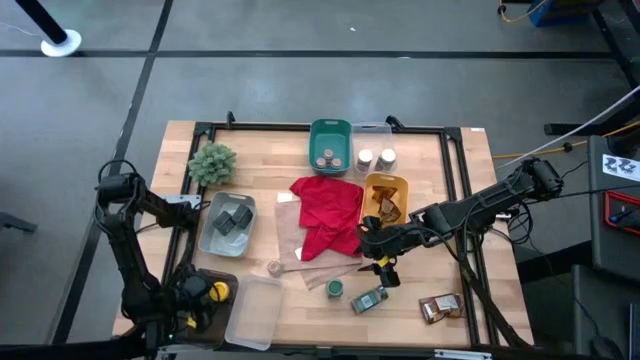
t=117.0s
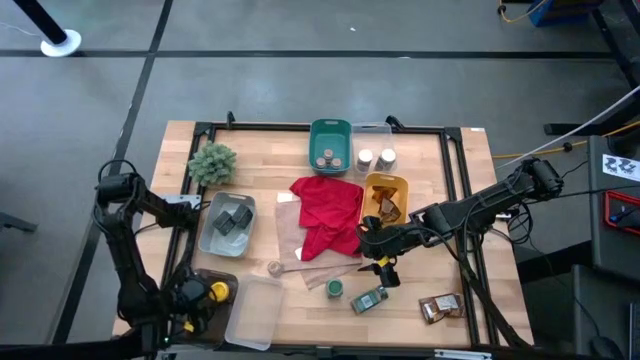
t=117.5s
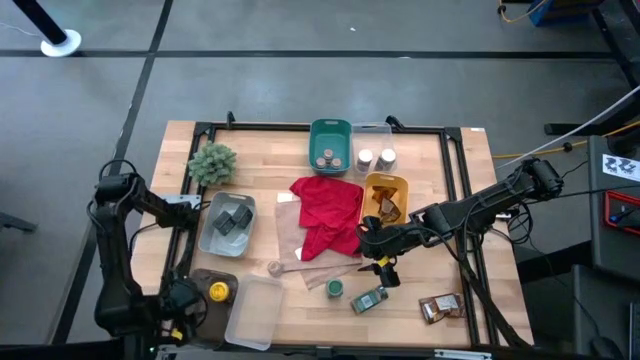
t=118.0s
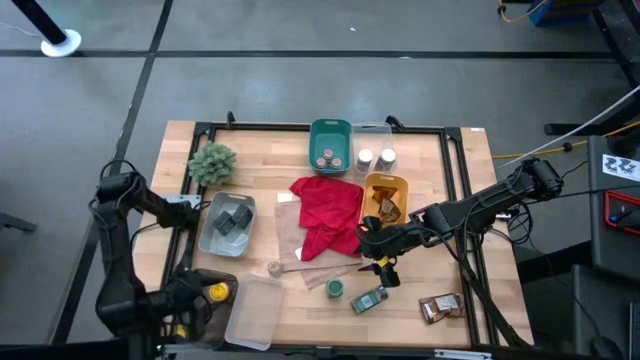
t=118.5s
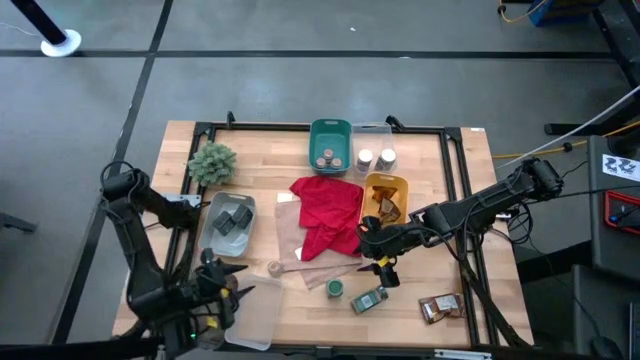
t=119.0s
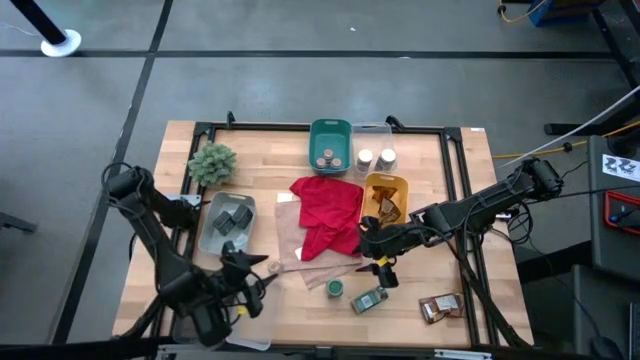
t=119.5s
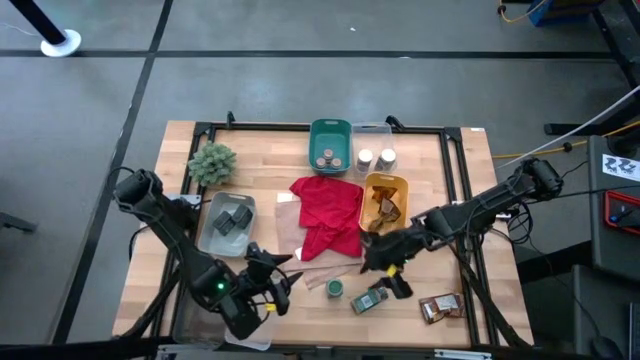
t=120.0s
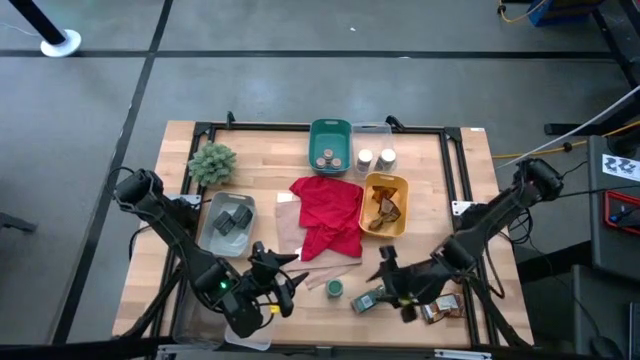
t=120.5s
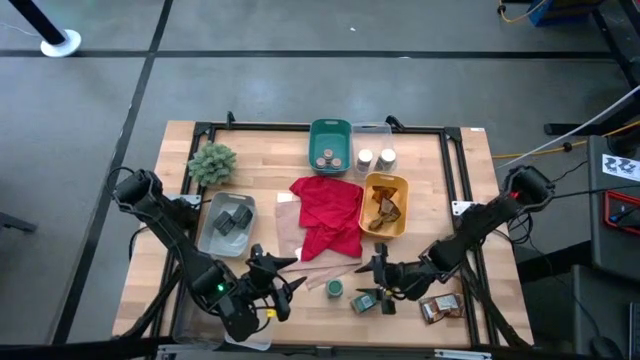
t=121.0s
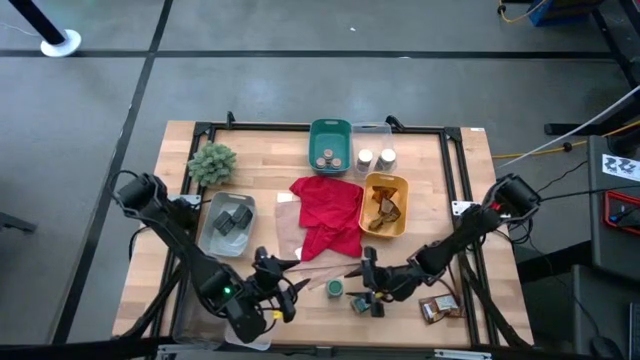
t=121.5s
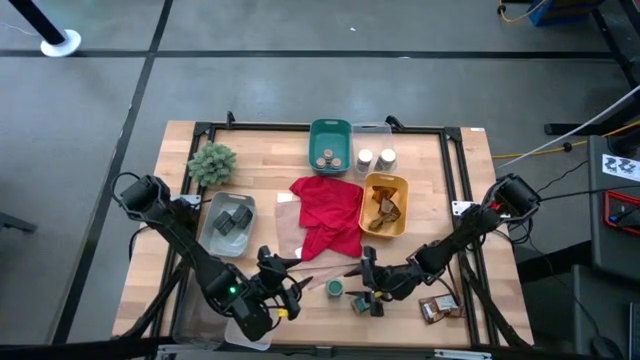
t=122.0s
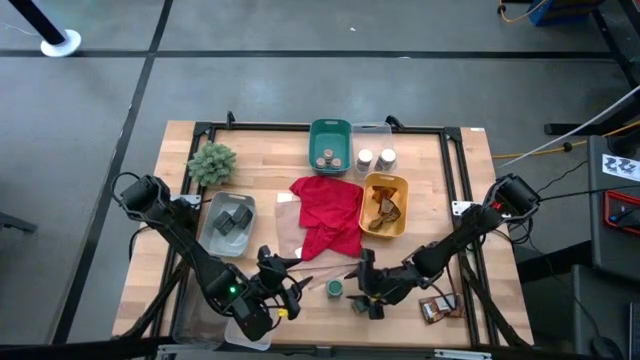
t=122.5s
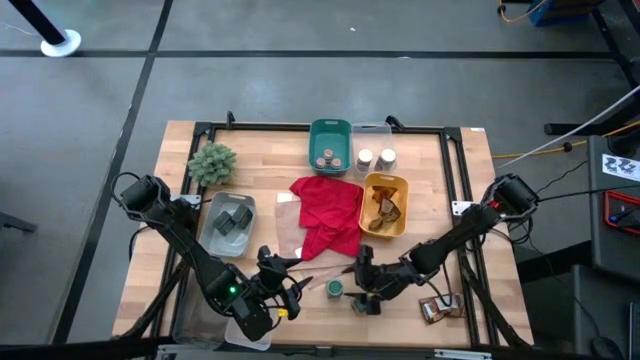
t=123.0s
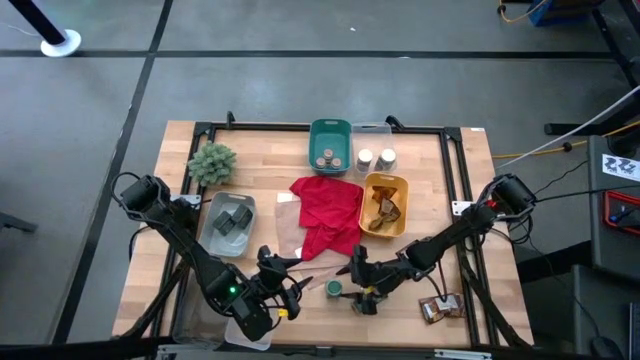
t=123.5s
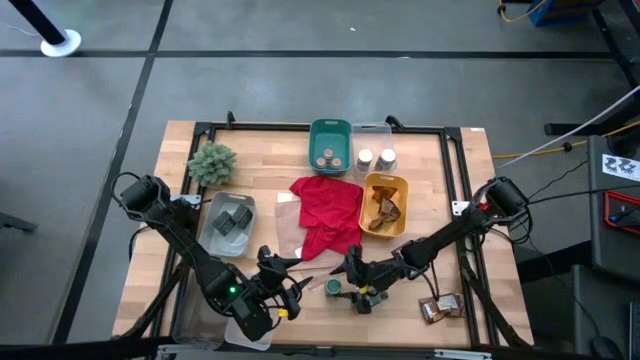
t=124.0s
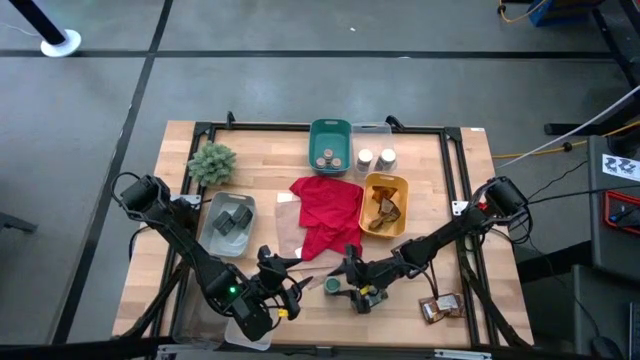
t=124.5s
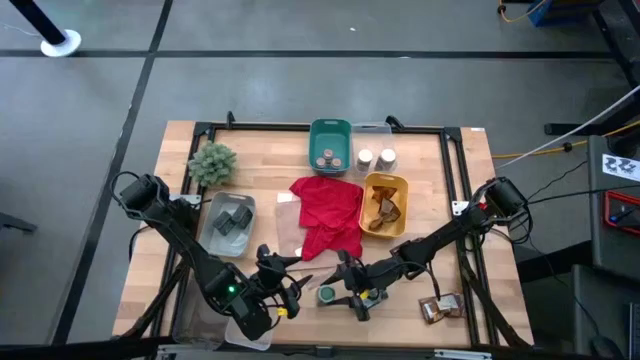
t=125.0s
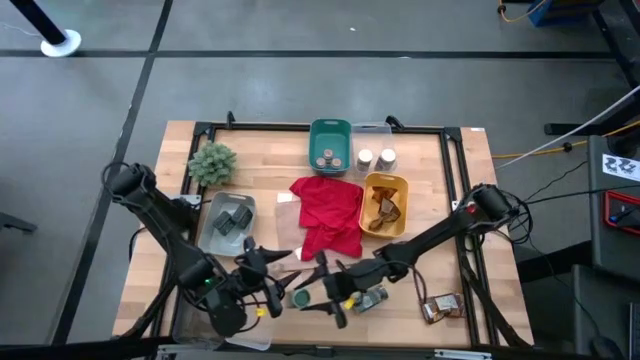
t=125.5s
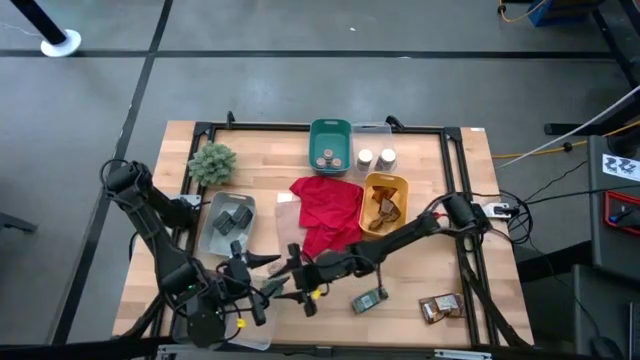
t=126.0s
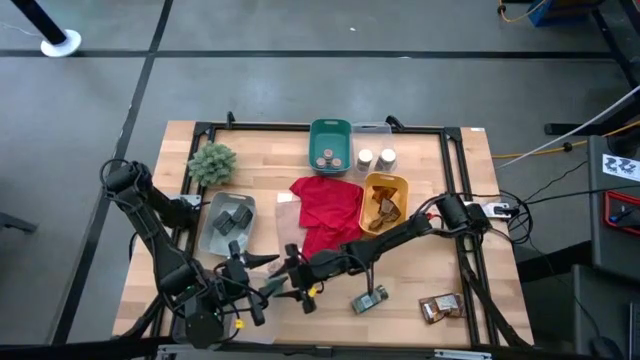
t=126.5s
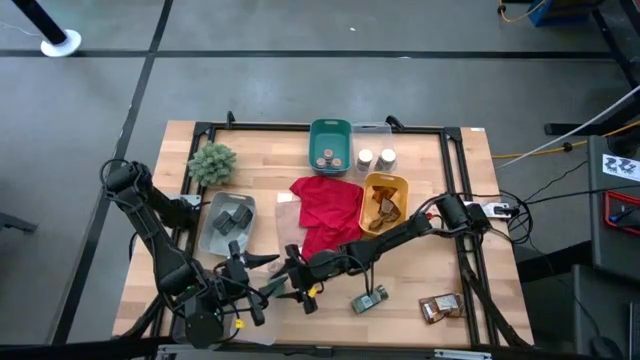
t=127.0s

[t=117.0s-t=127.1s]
Task: Sort spices by type
Put the left green seasoning bottle into the bottom left transparent bin

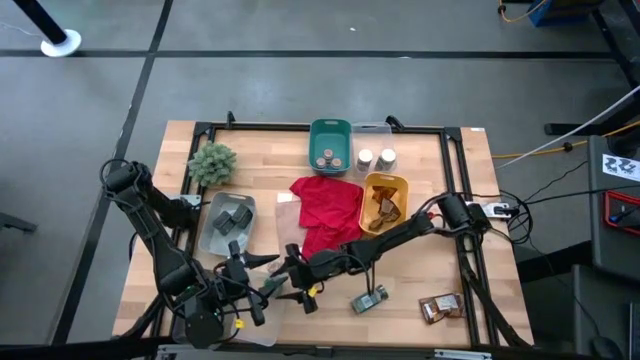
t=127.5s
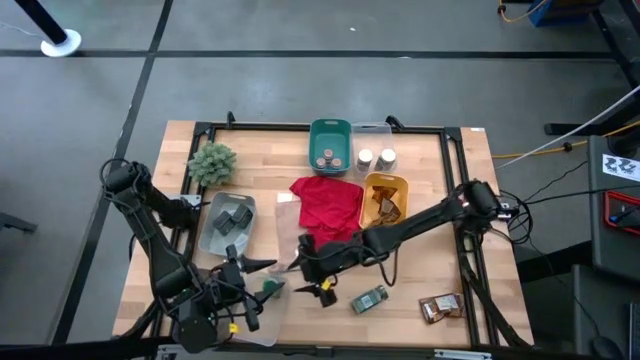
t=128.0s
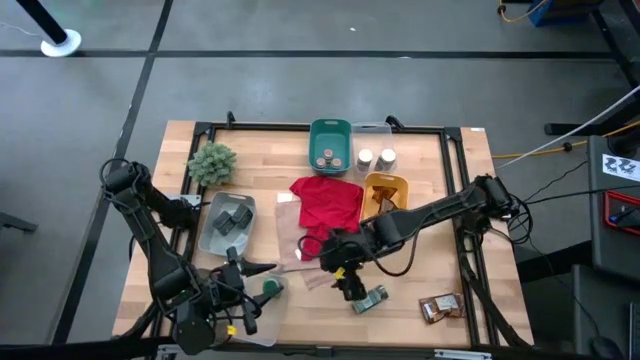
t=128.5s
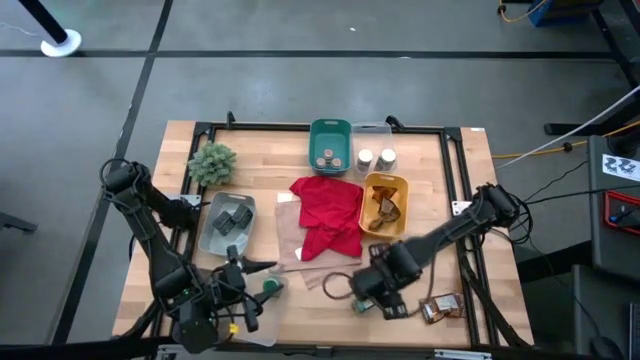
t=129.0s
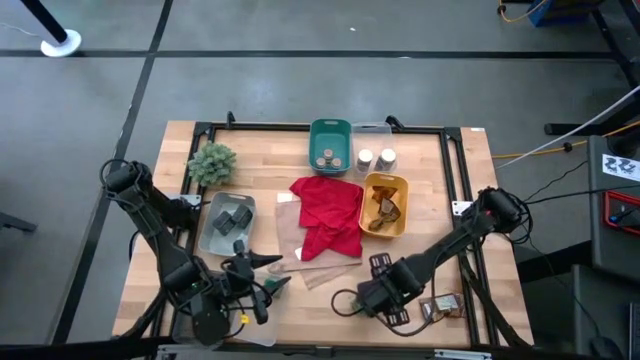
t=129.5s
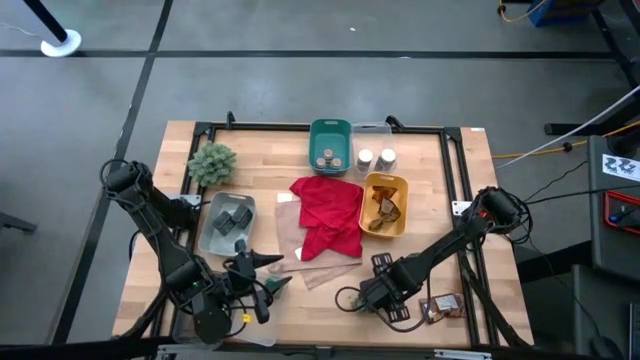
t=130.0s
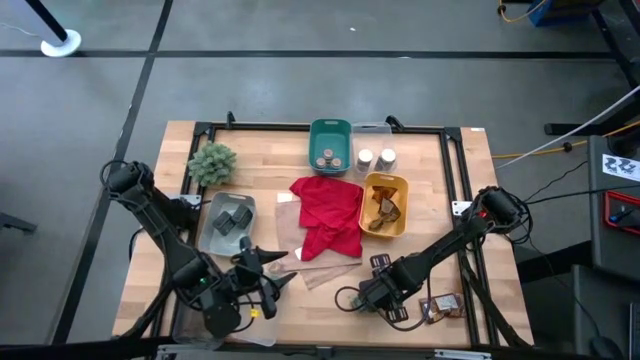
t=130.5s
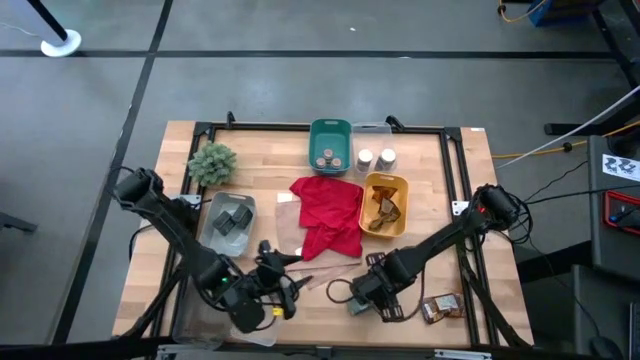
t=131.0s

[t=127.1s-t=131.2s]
Put the green seasoning into the bottom left transparent bin

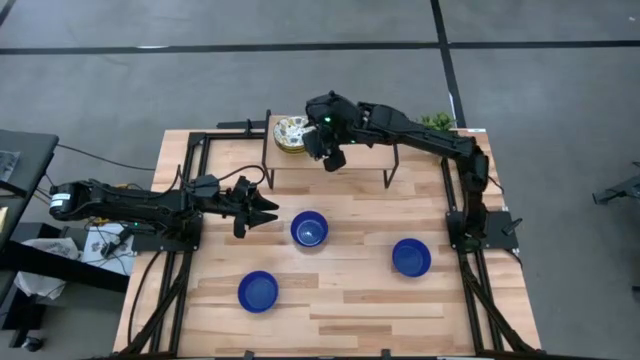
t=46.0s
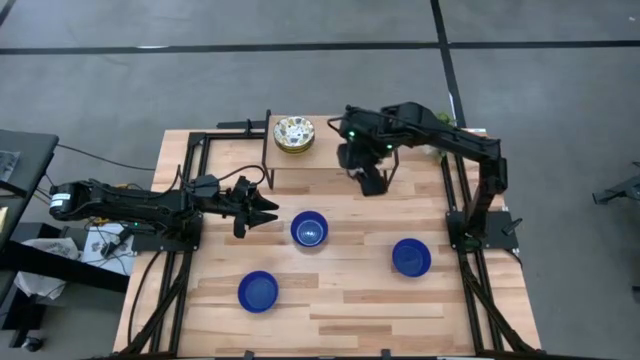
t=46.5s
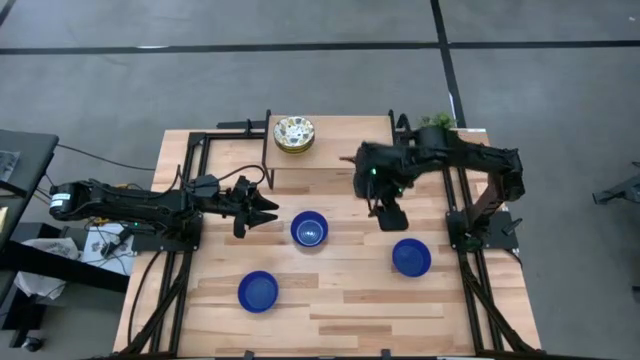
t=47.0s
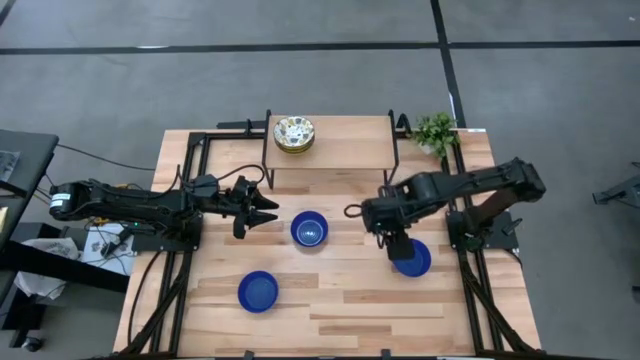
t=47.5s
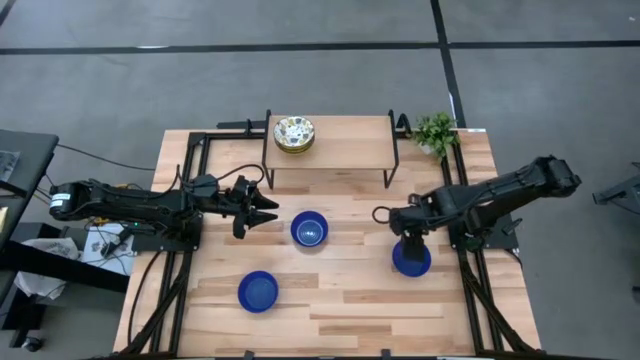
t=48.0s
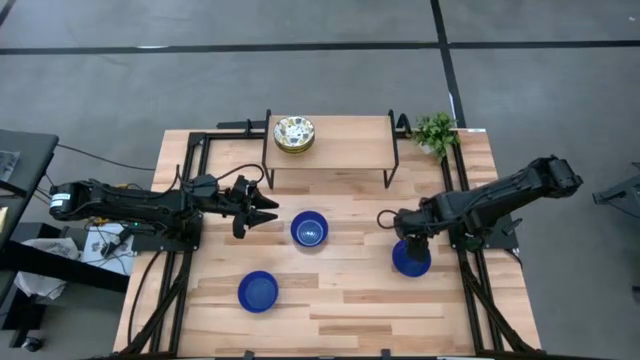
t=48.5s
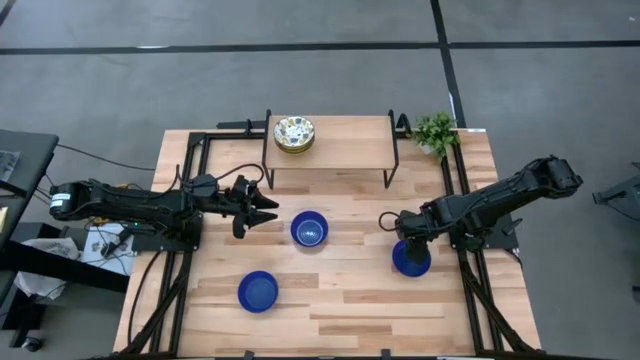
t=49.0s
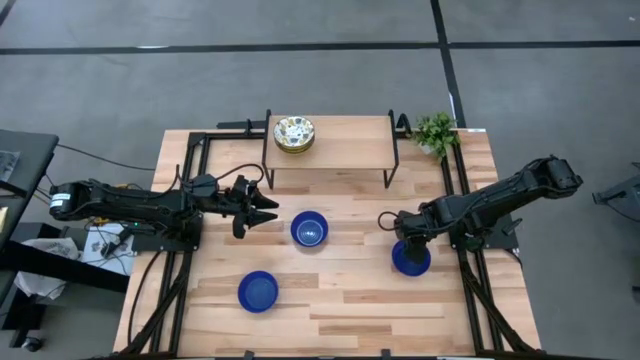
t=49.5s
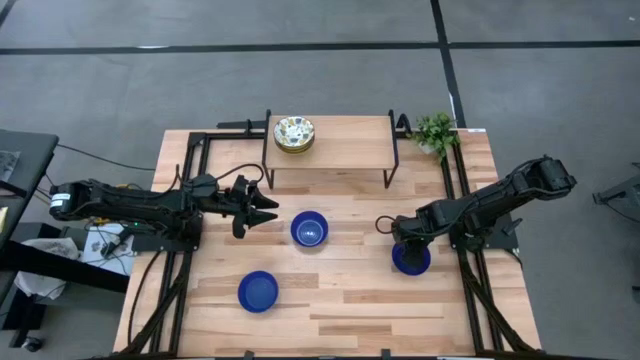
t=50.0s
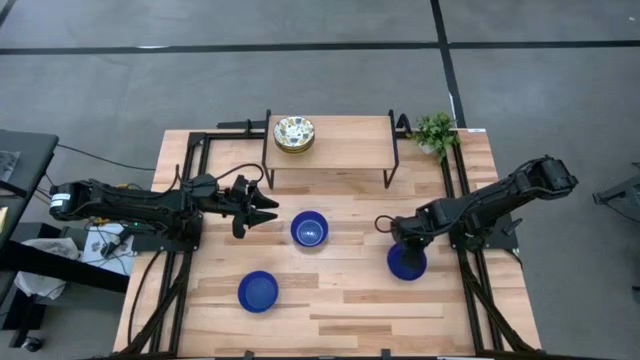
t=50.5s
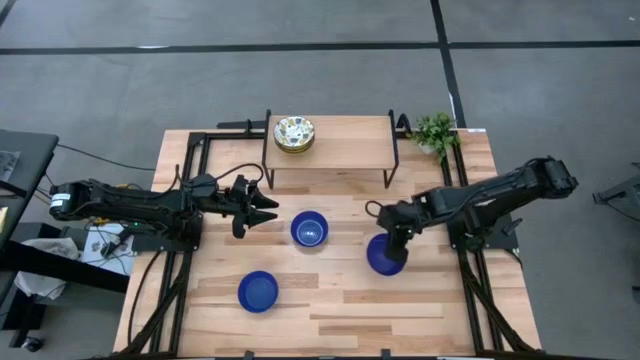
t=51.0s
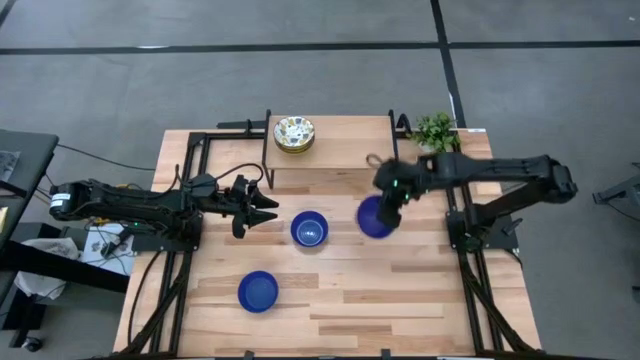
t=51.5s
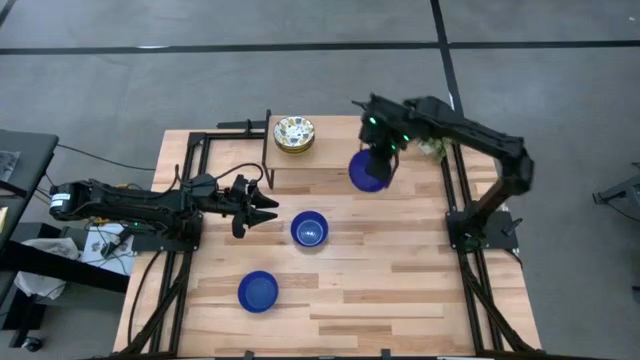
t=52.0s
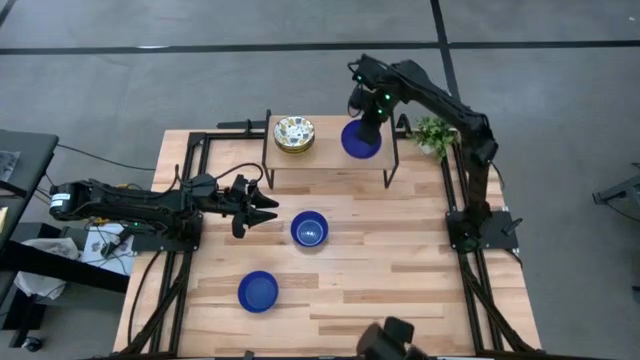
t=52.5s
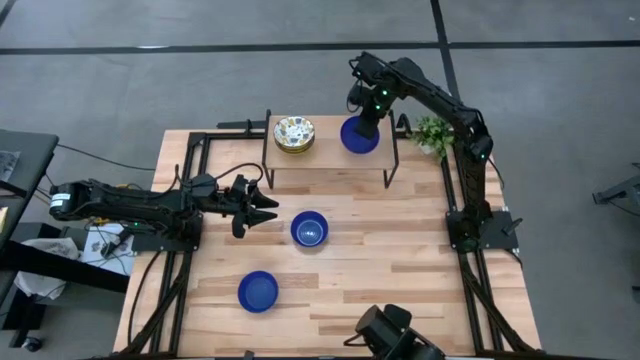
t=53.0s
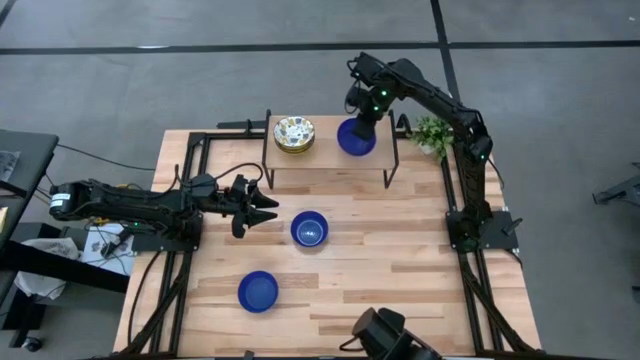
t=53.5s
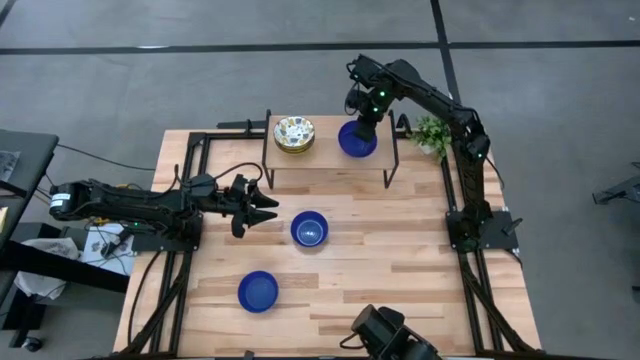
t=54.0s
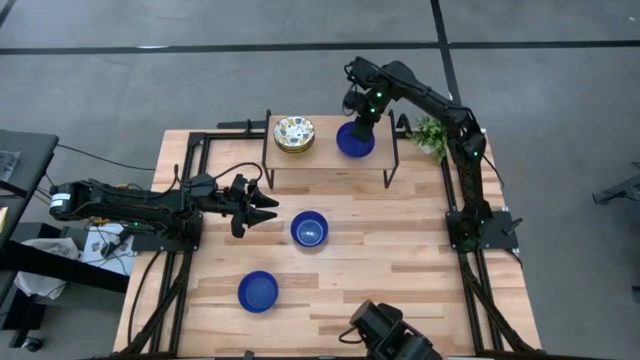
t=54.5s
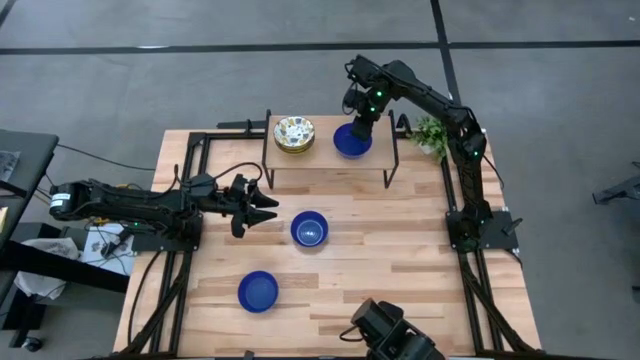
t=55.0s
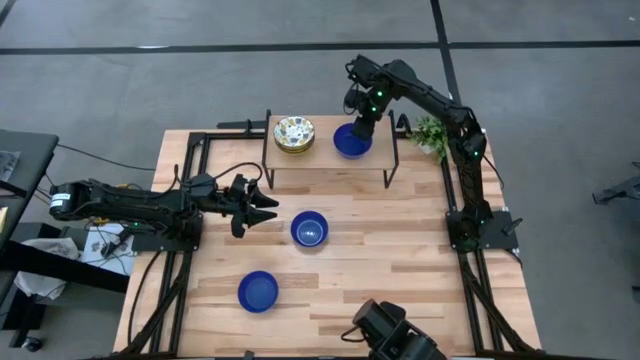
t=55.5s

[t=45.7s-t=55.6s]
Task: Pick & Place Mini bowls
Put the right blue bowl on the shelf
